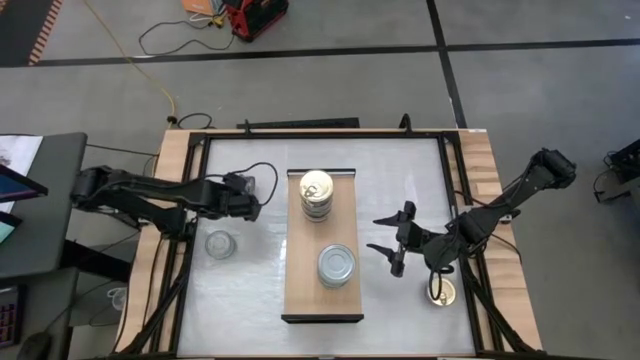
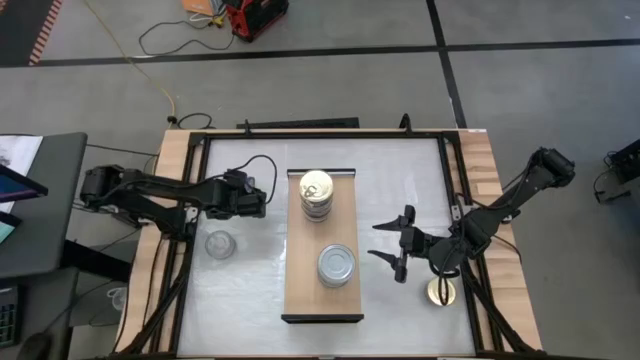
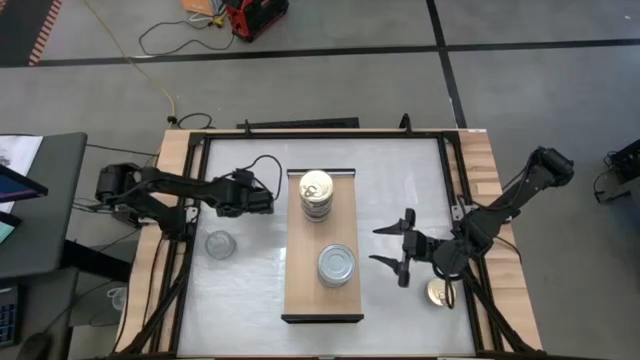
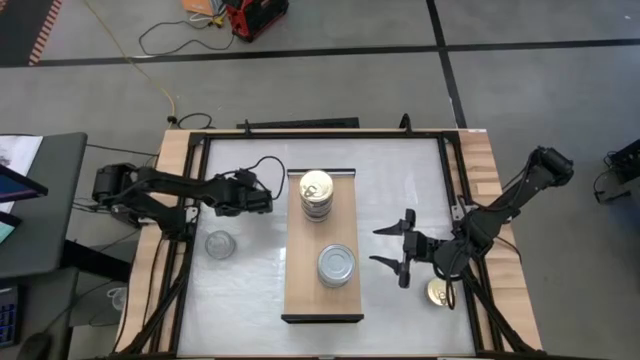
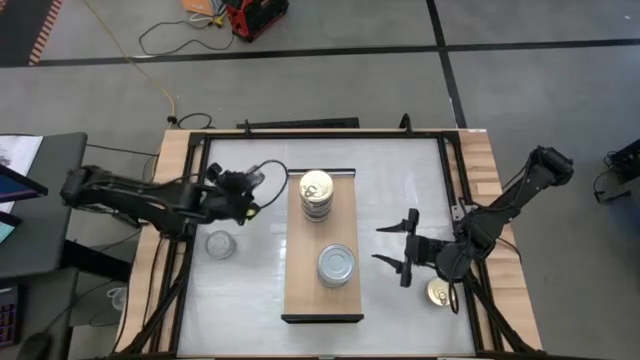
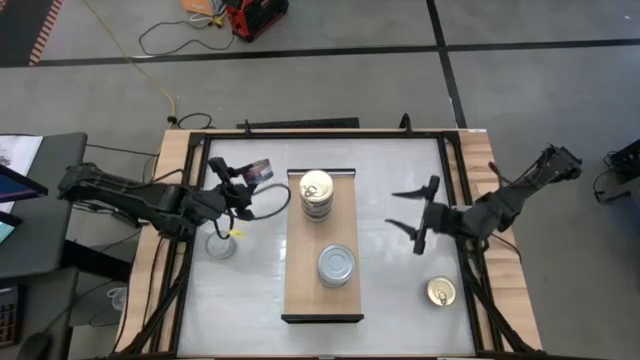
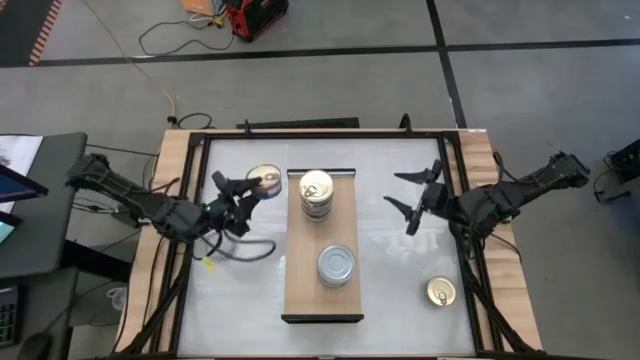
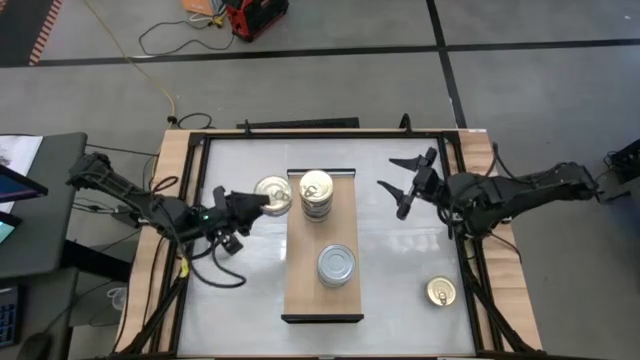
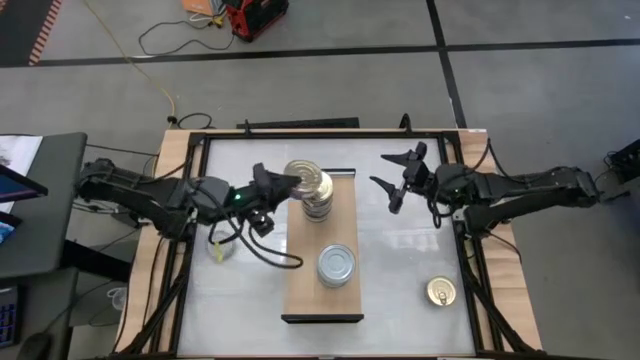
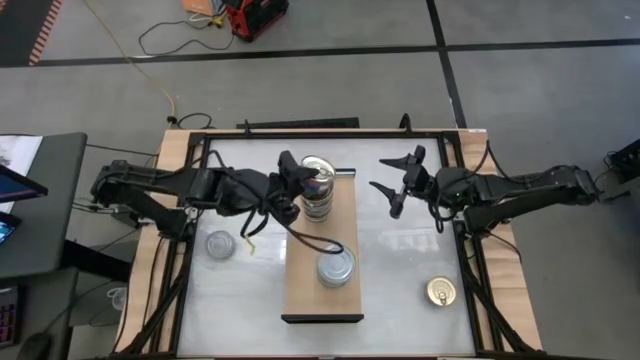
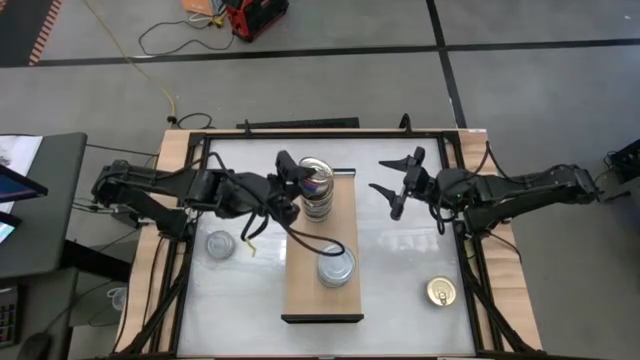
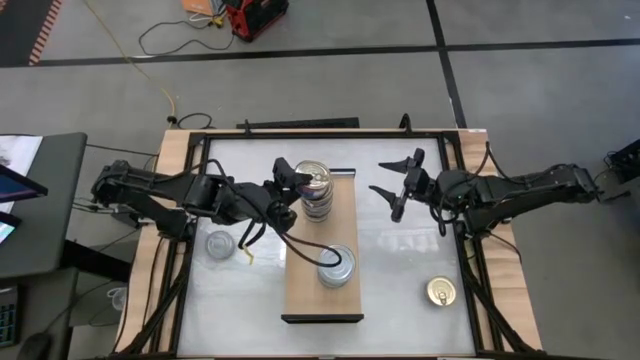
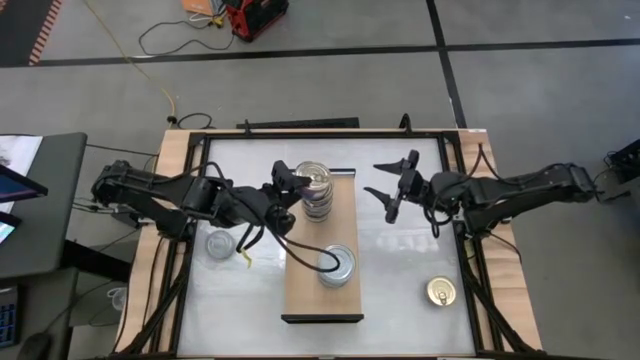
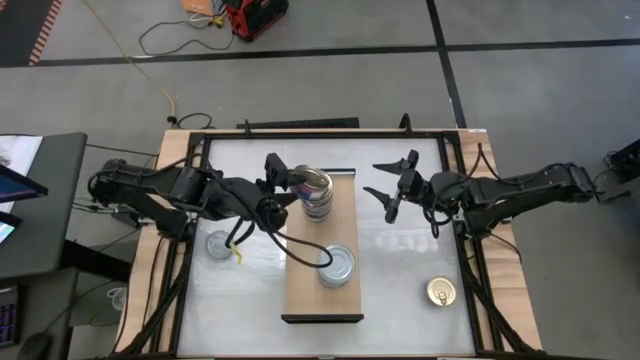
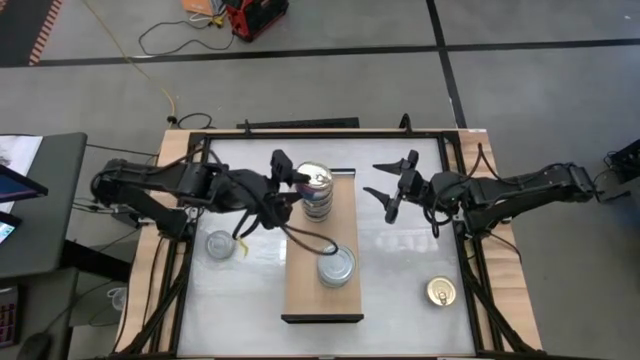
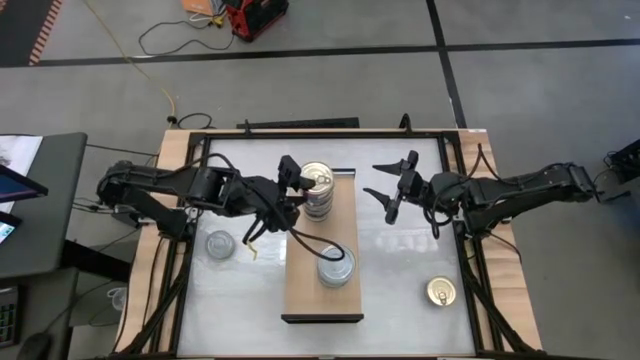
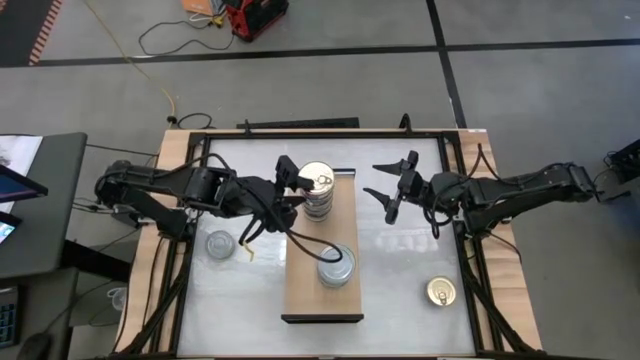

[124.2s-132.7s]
Task: Stack canned seafood by type on shelf
Stack the blue tuna can on top of the stacked blue tuna cans on the shelf

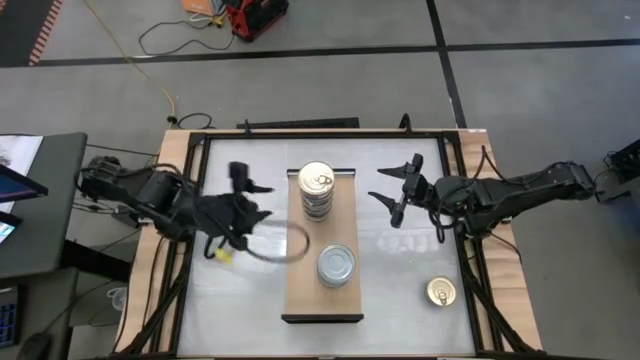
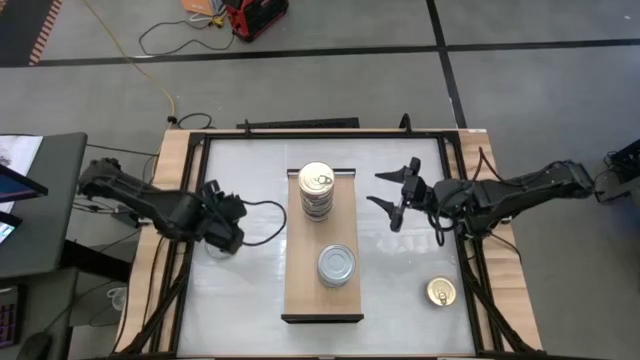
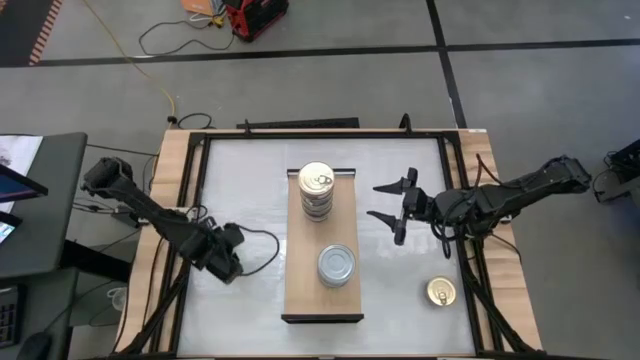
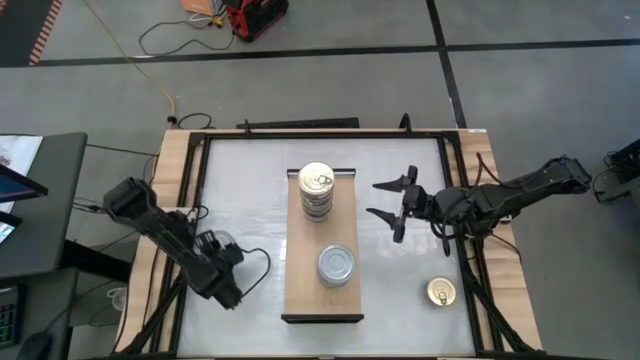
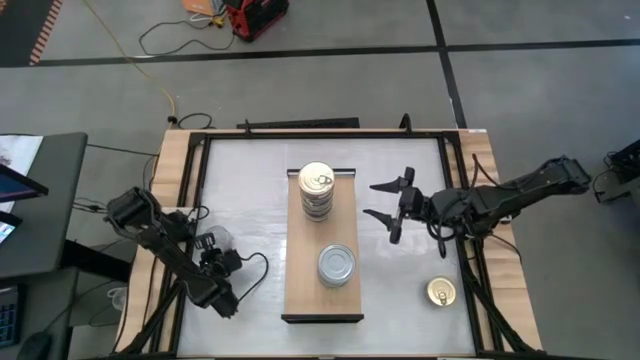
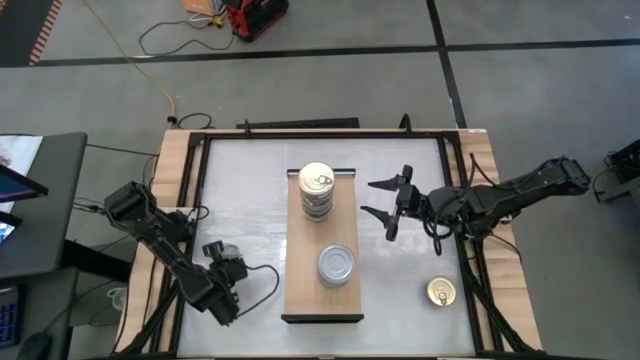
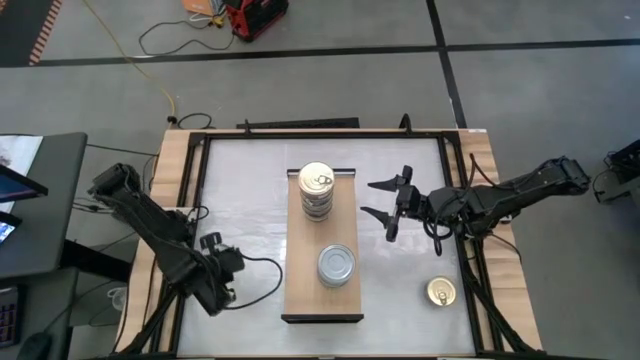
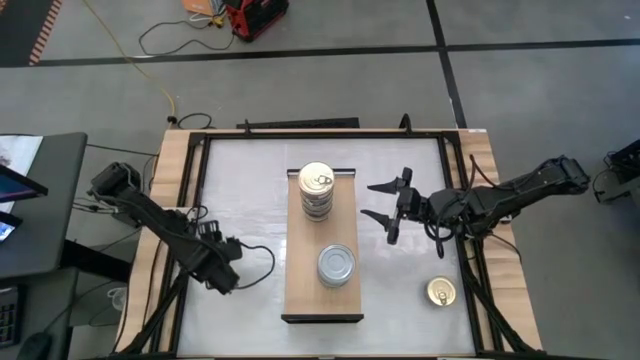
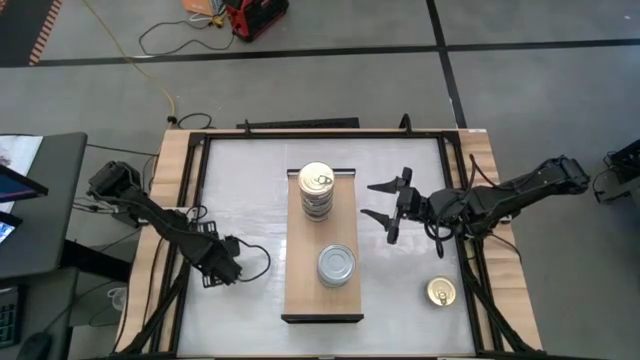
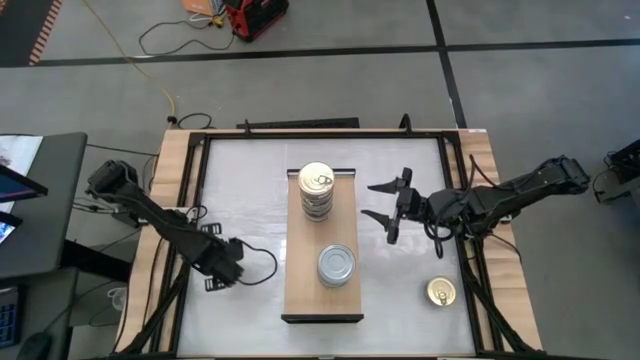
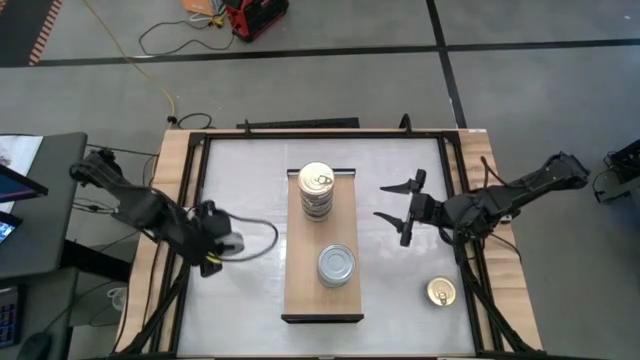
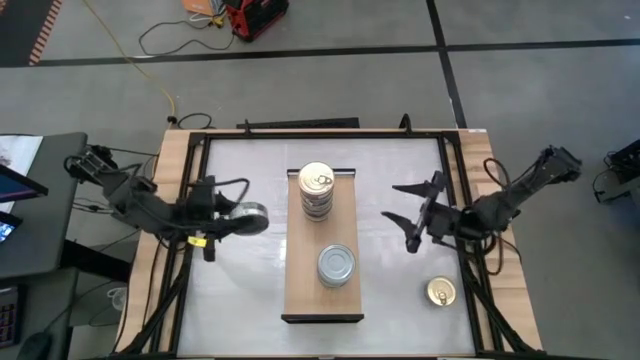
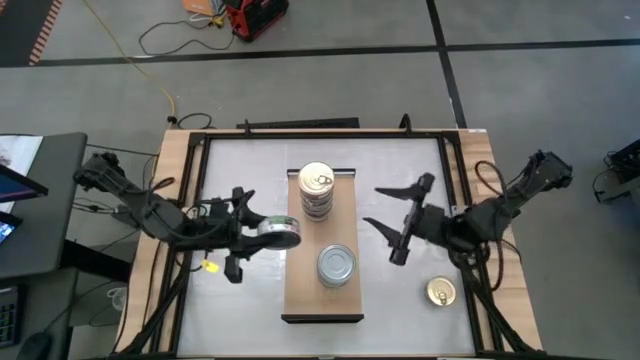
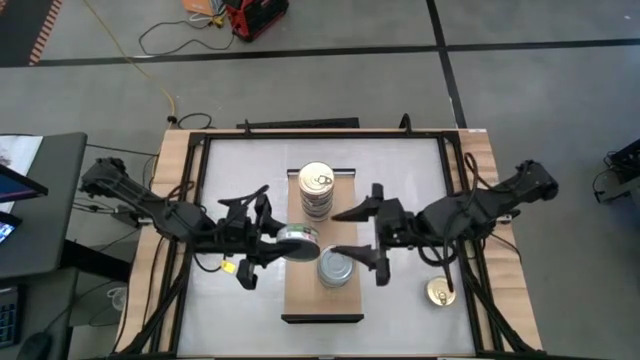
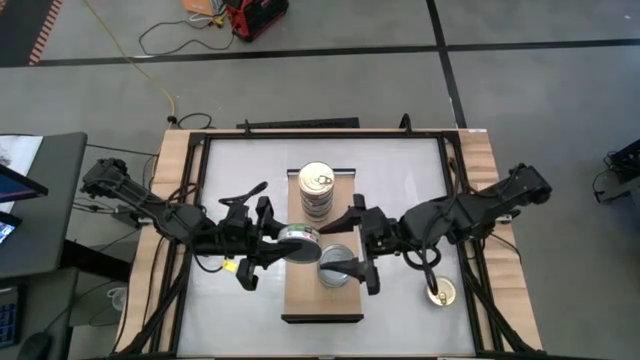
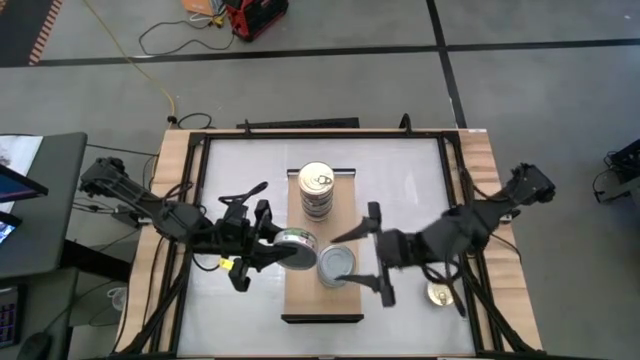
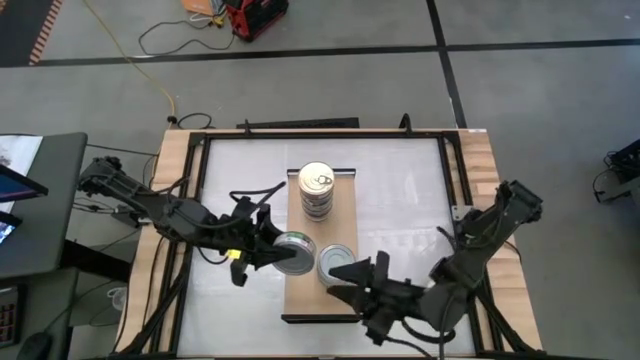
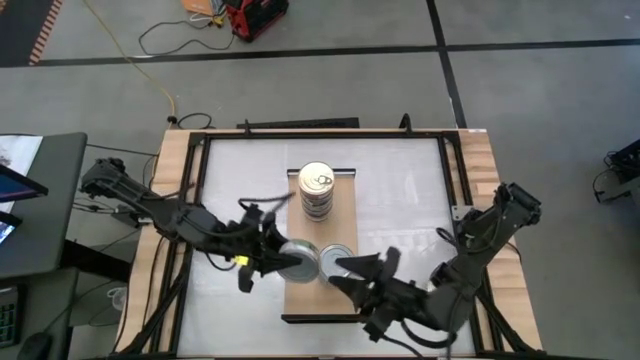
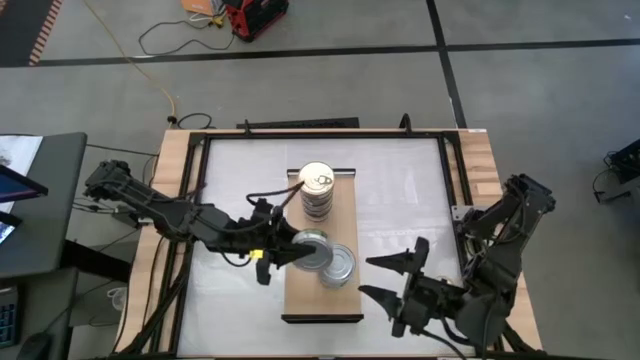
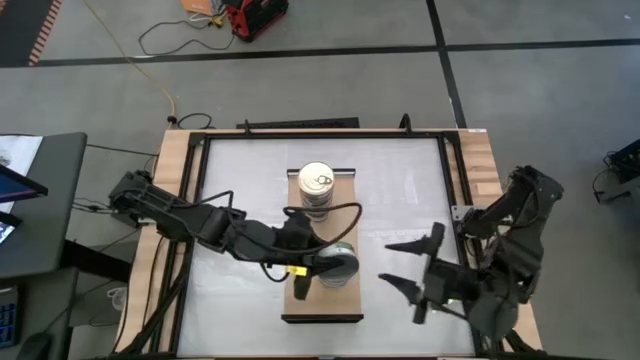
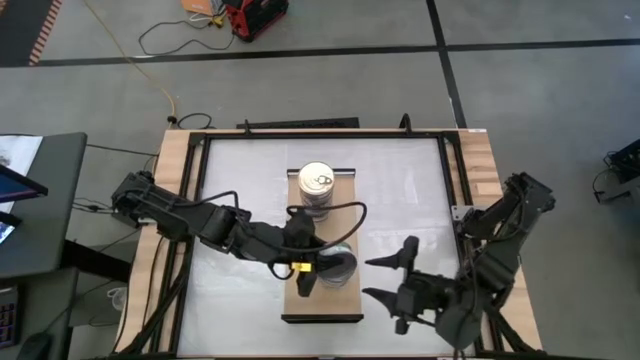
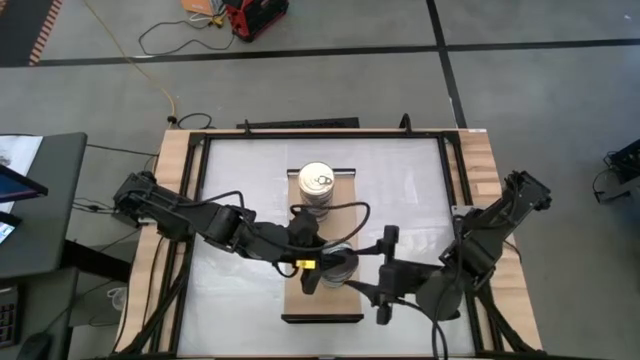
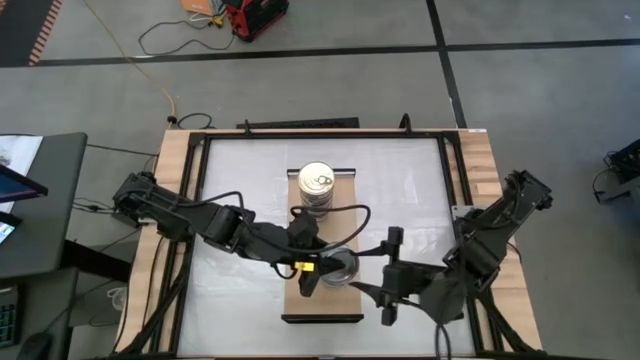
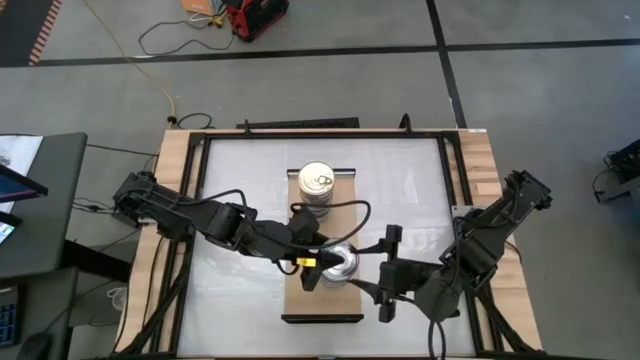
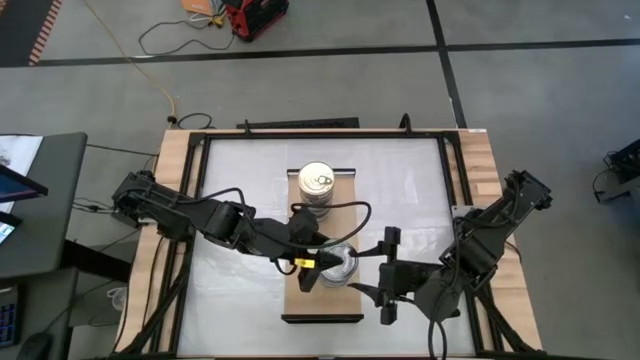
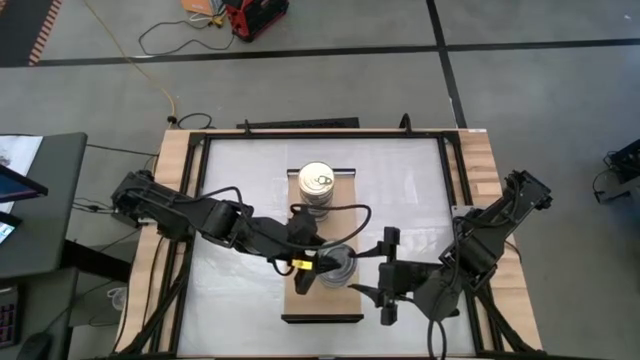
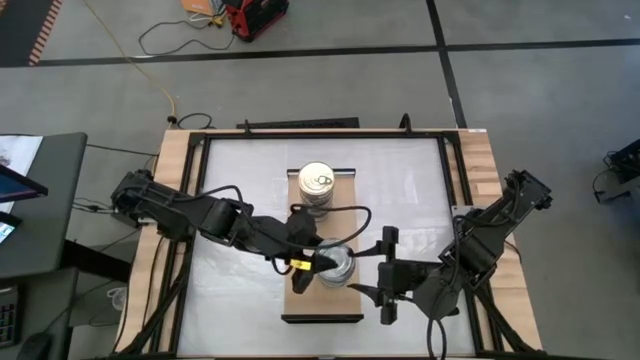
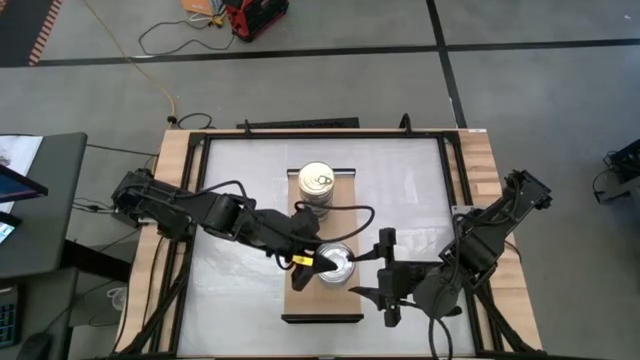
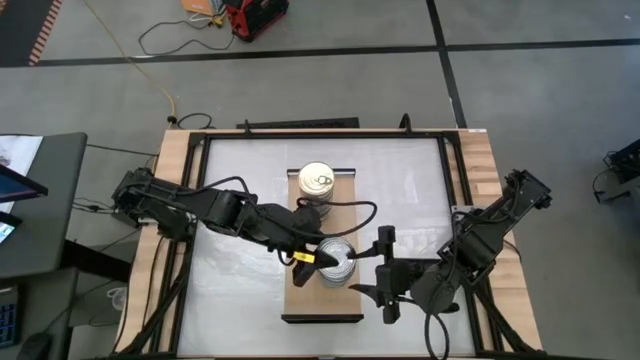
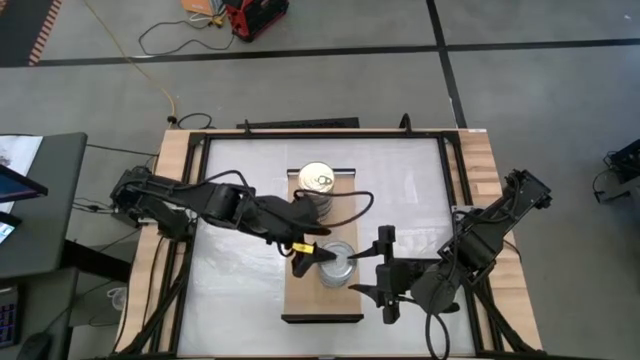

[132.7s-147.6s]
Stack the green tuna can on top of the stacked green tuna cans on the shelf
